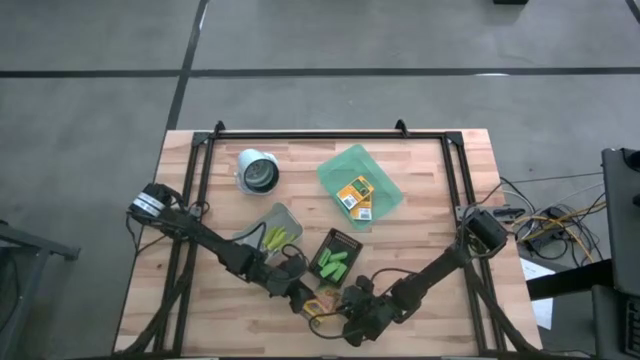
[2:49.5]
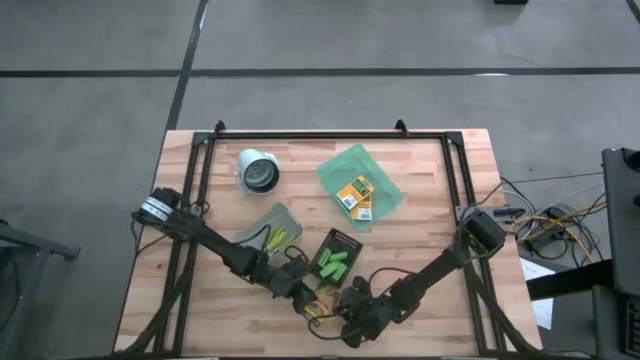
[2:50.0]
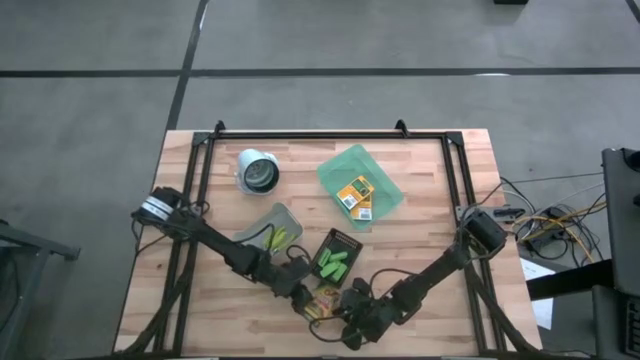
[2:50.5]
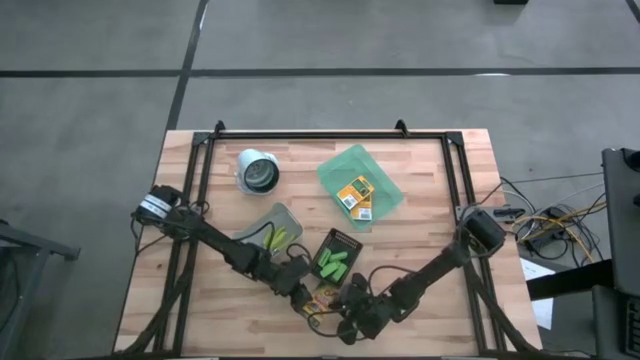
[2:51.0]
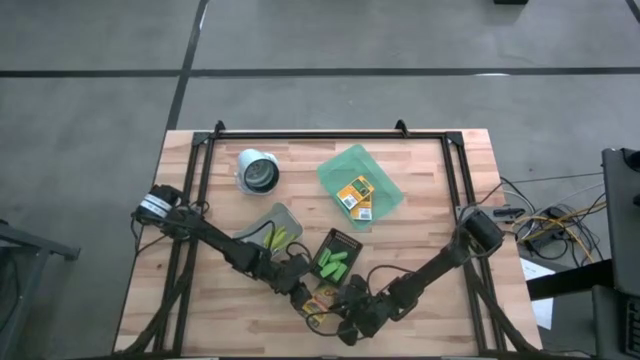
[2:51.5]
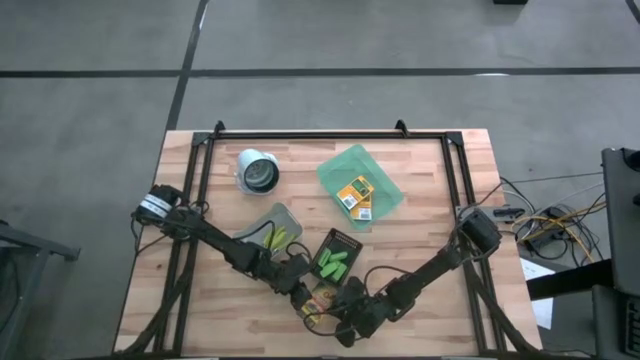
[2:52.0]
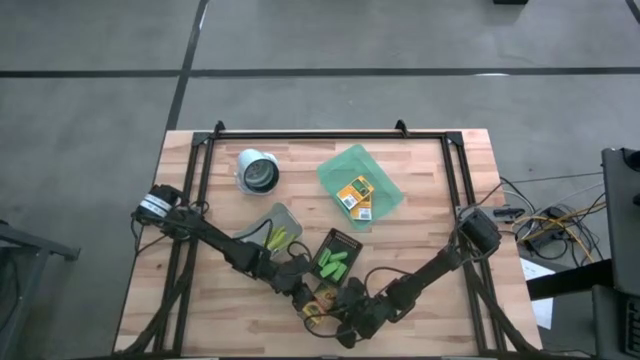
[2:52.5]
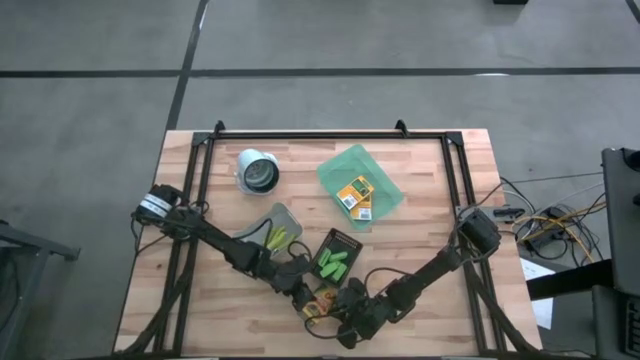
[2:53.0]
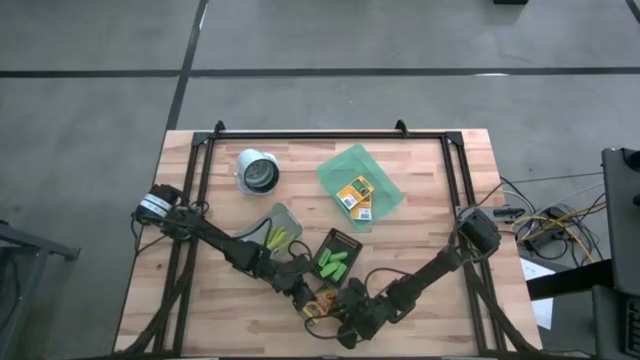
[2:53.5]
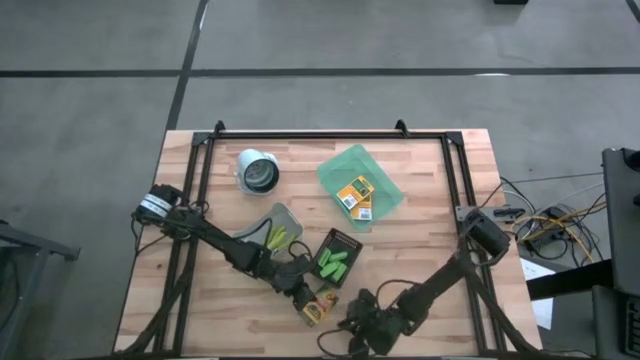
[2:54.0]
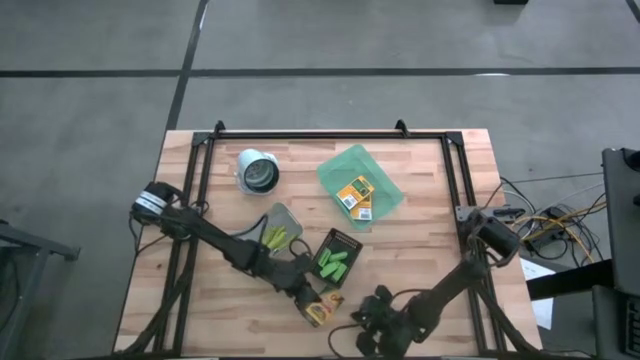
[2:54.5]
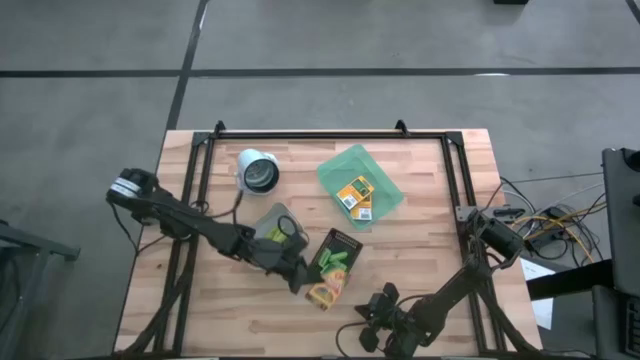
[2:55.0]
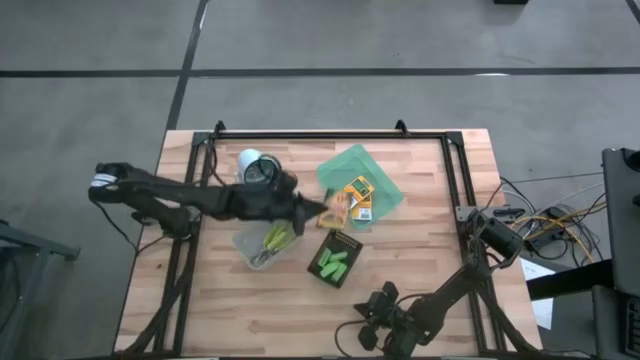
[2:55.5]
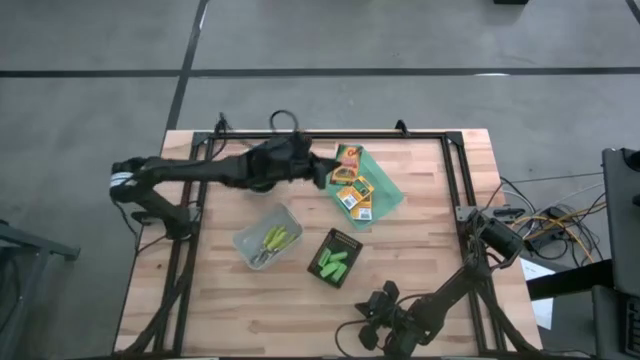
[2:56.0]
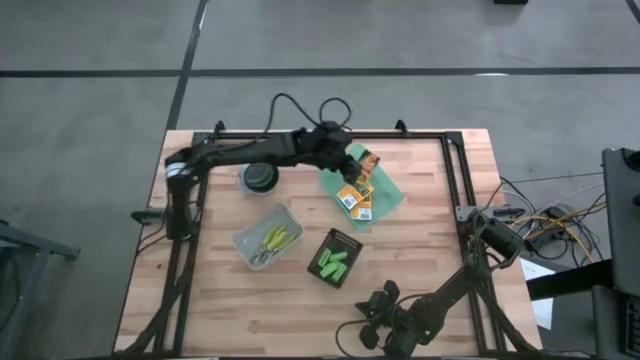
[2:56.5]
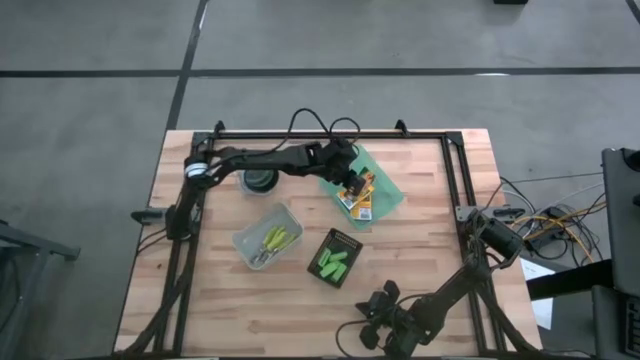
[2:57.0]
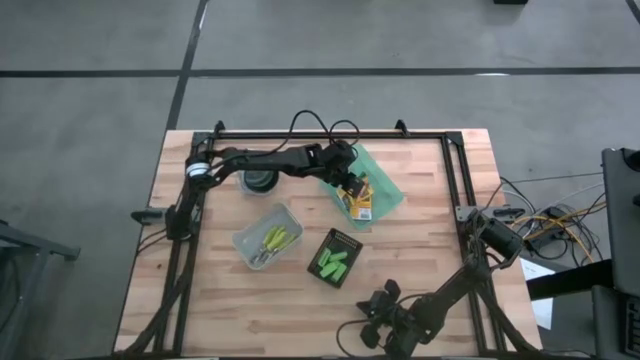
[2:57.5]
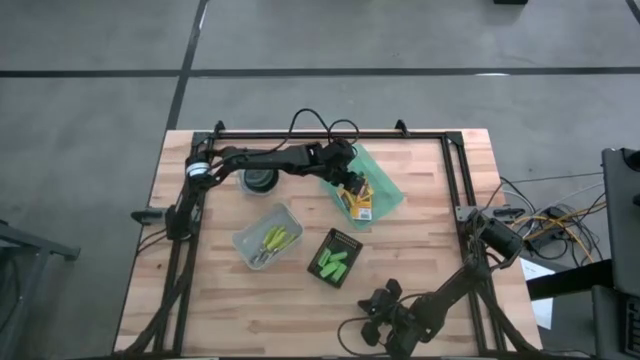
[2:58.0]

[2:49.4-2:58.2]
Task: Pick & Place School Supplies
Put the crayon box into the light green bin

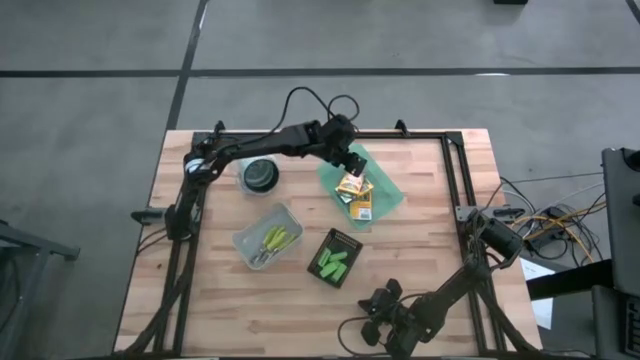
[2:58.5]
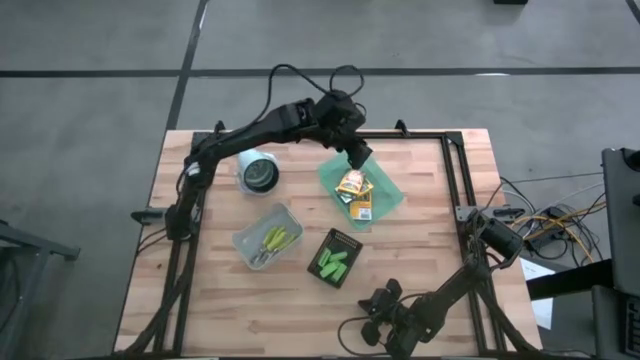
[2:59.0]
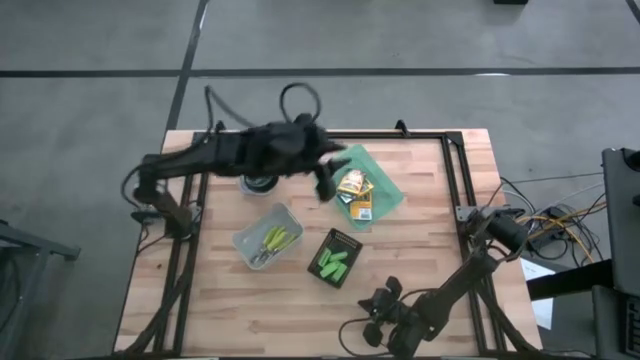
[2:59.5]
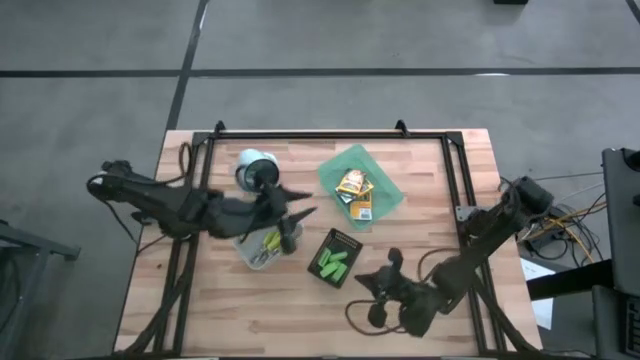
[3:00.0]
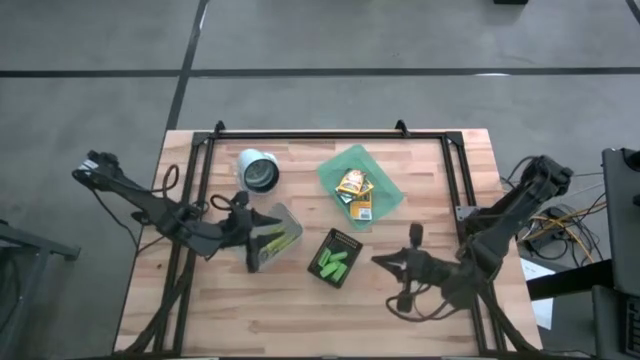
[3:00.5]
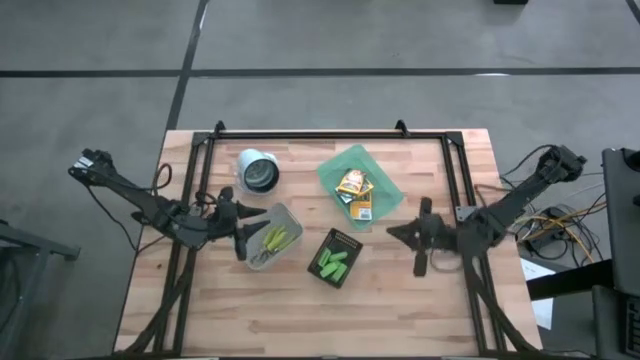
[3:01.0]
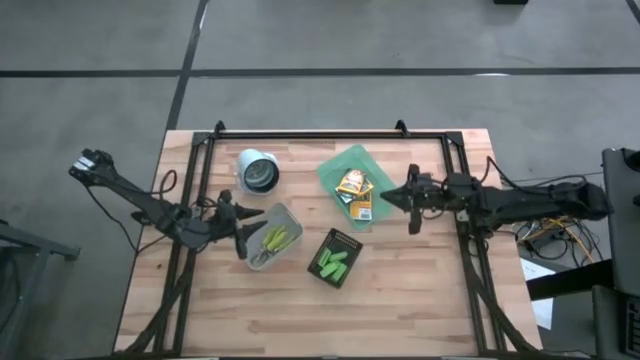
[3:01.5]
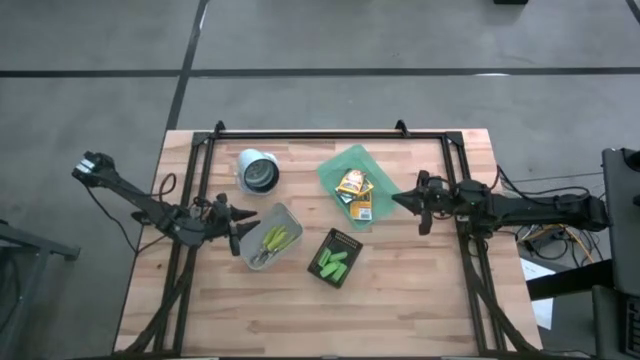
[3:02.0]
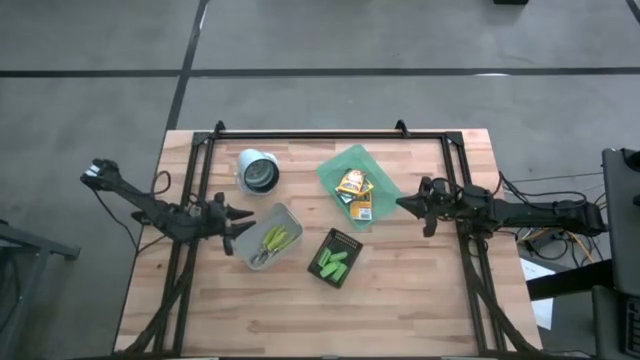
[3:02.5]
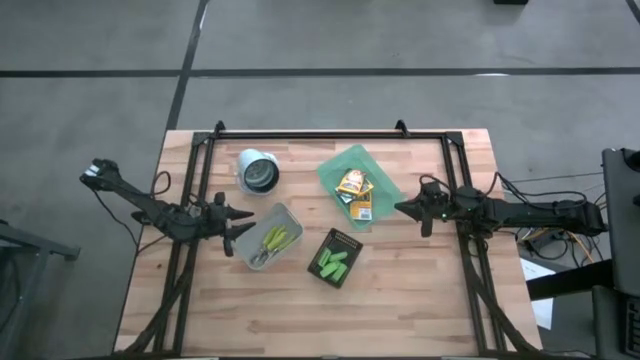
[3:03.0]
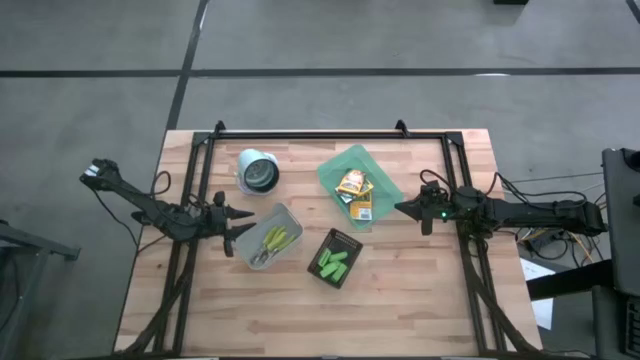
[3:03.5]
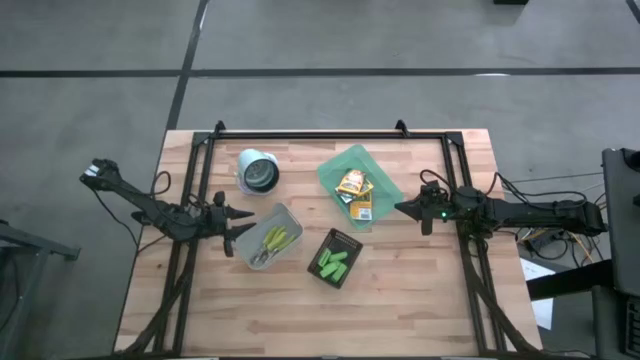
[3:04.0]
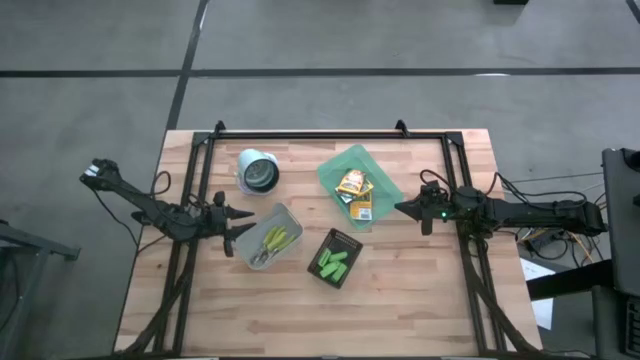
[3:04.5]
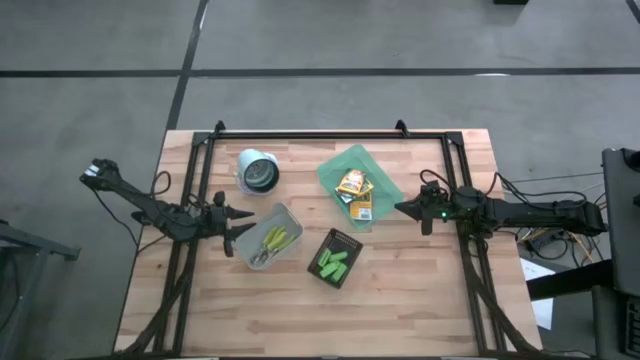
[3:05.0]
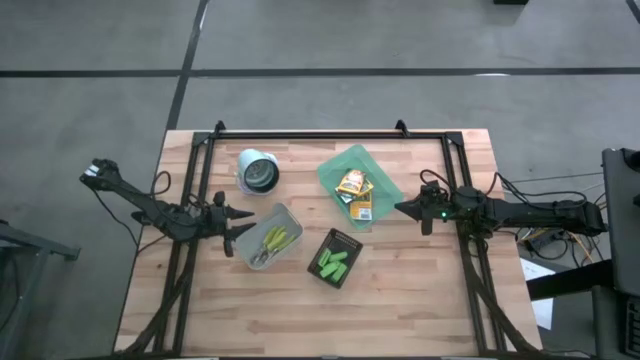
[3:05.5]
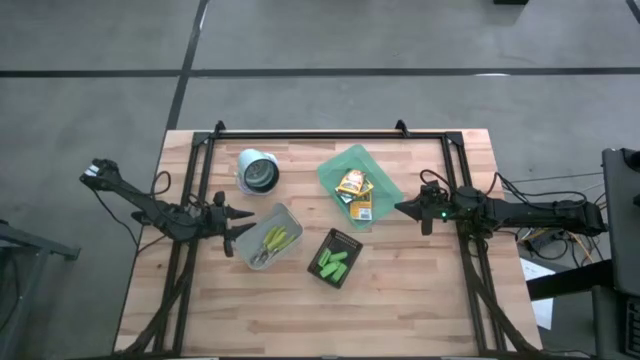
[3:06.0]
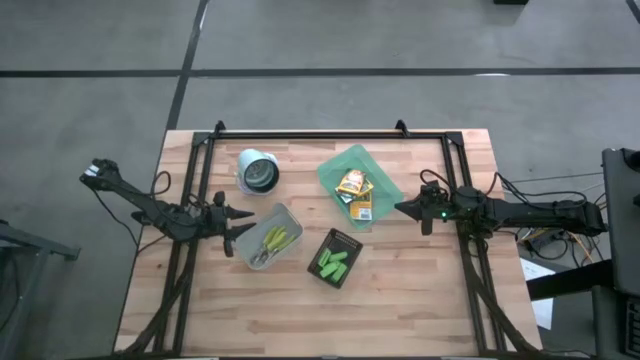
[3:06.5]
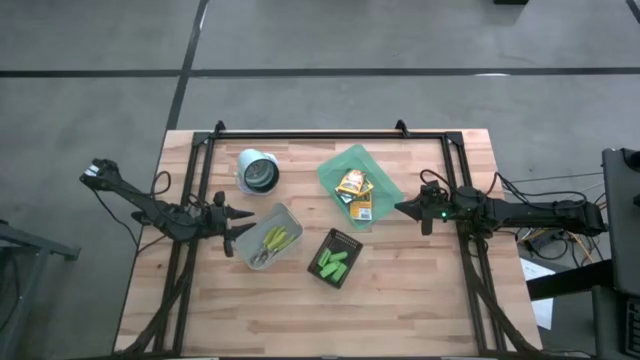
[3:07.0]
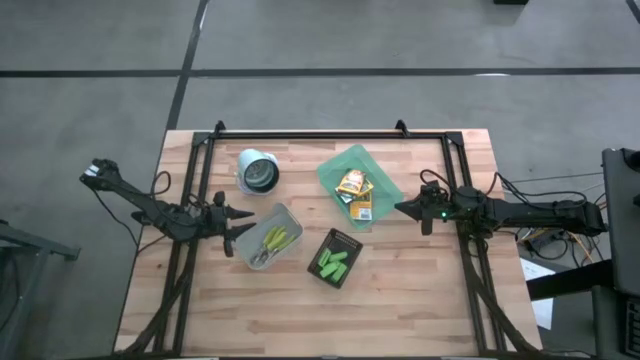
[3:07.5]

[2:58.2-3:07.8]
Return to Home Position

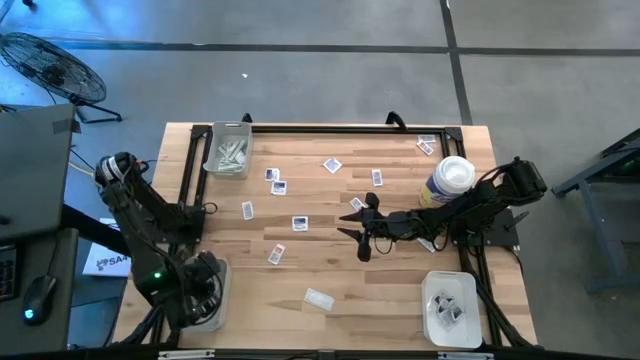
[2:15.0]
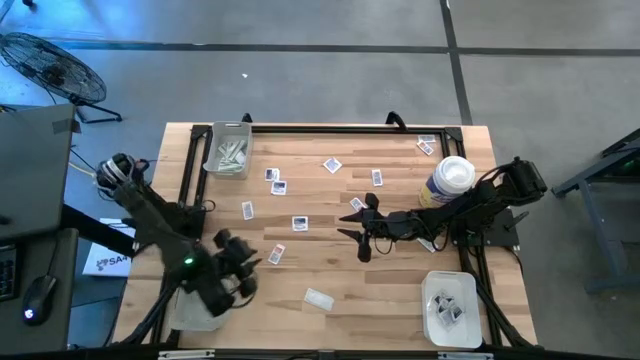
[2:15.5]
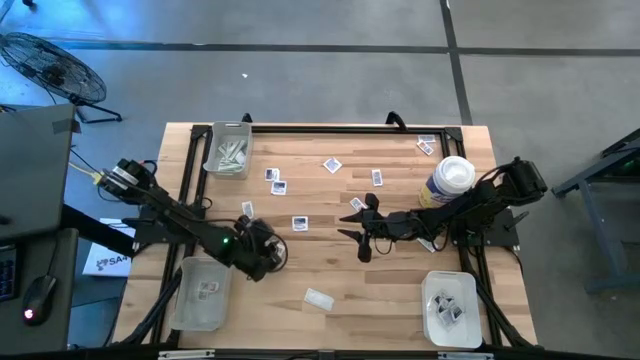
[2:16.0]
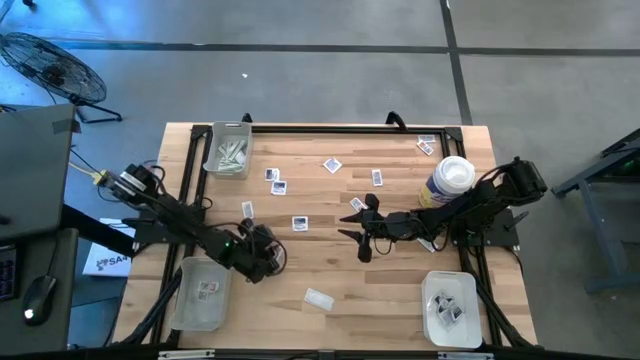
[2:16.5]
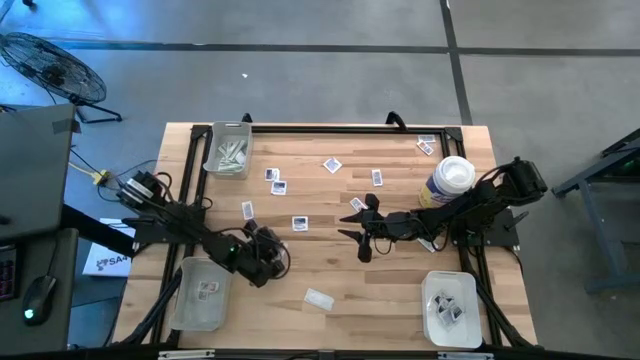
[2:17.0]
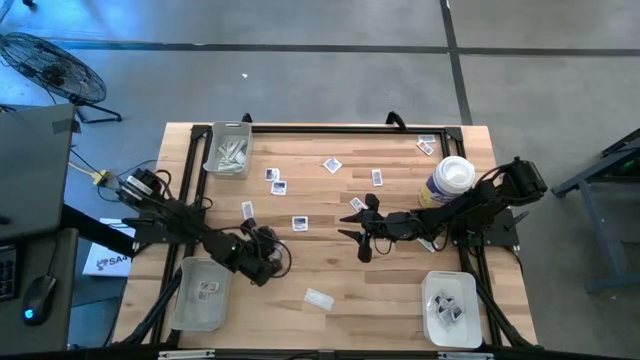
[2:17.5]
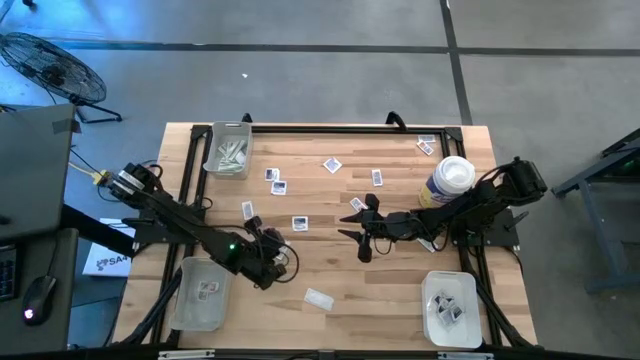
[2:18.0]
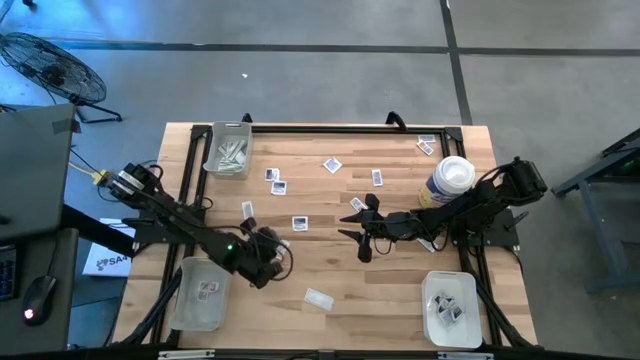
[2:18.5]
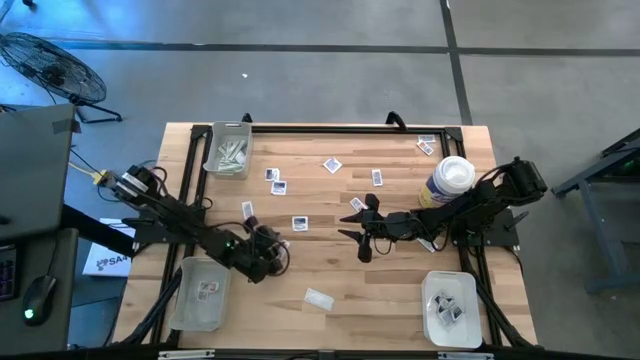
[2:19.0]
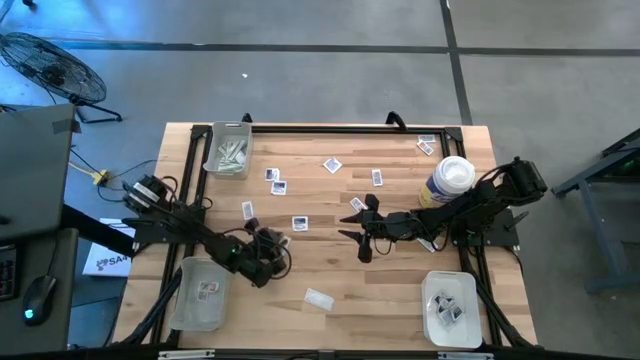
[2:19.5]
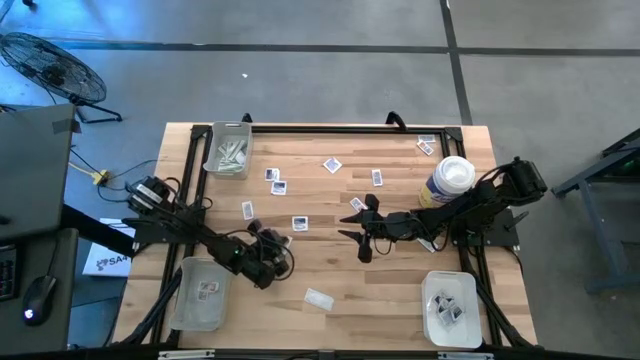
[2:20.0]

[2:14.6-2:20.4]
Task: Pick & Place First Aid Supplies
Put the orange ointment pack into the bottom gray bin
